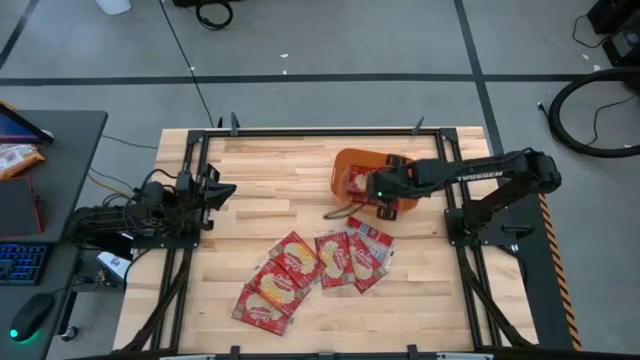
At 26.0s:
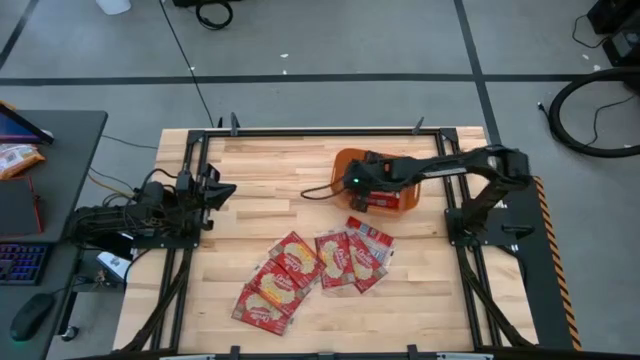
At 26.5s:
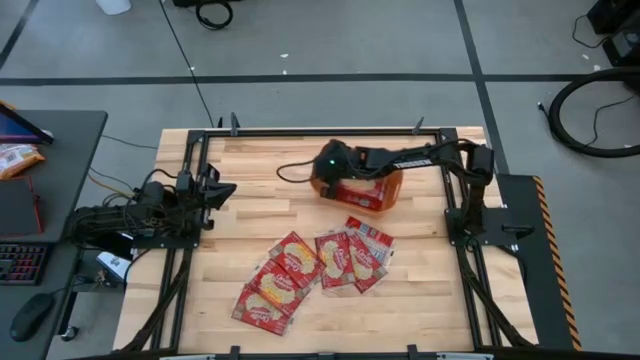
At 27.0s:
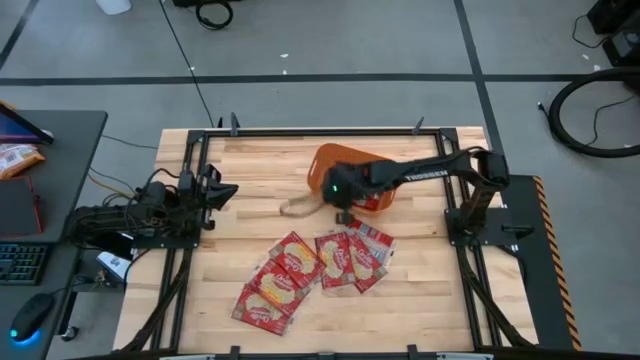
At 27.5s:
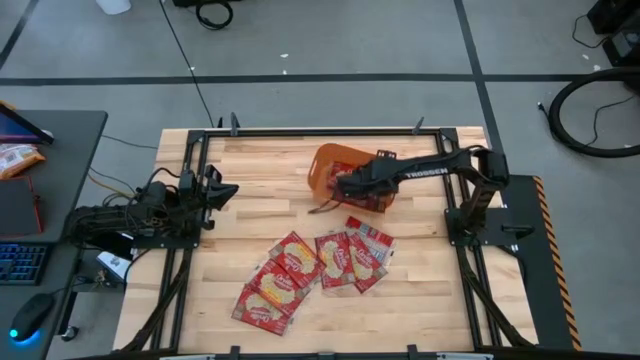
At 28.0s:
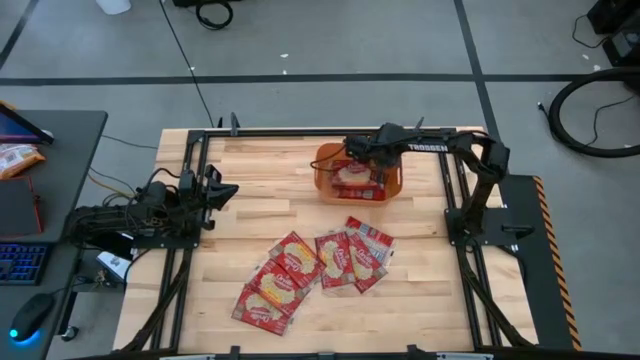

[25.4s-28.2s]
Task: Sort popcorn bags into baskets
Adjust the orange bin on the table

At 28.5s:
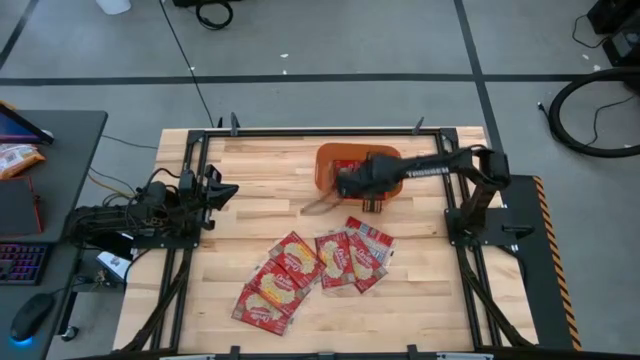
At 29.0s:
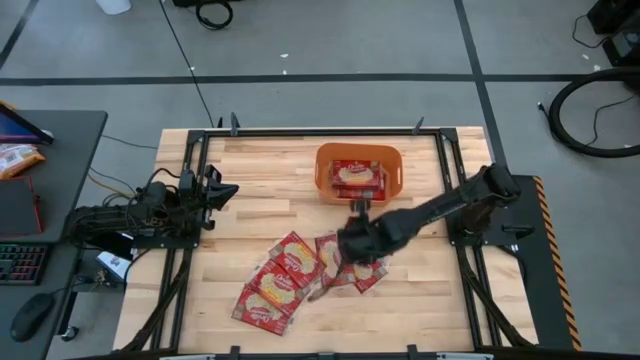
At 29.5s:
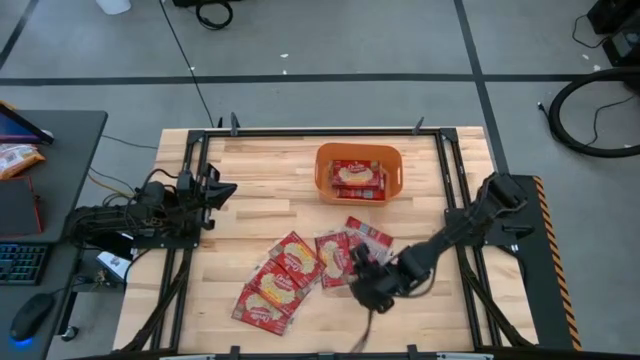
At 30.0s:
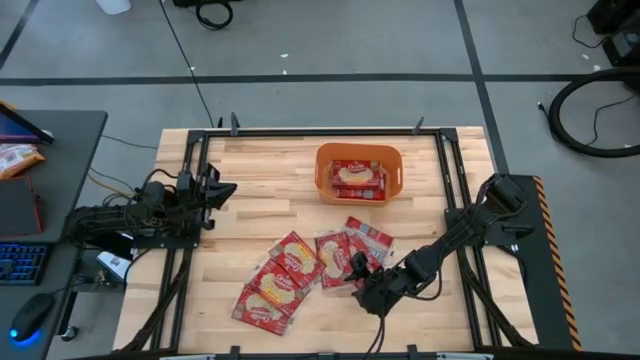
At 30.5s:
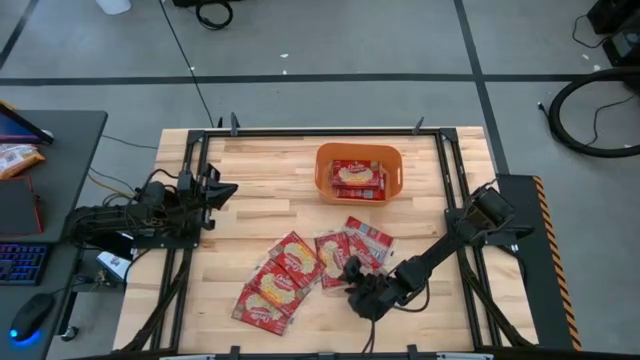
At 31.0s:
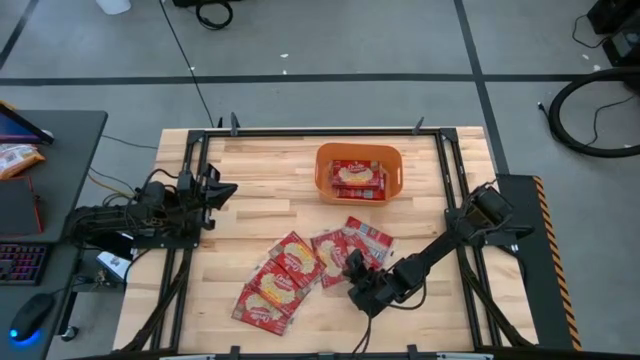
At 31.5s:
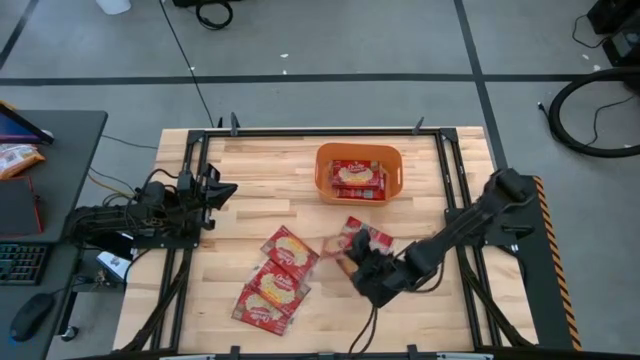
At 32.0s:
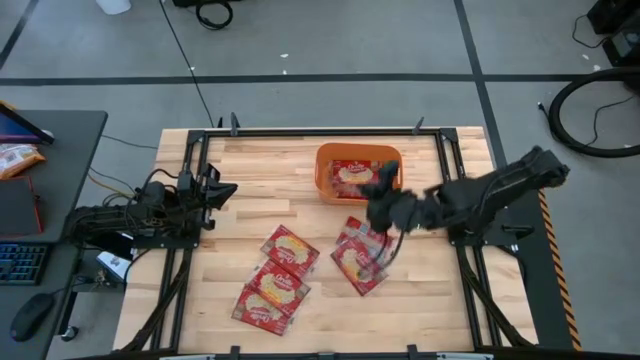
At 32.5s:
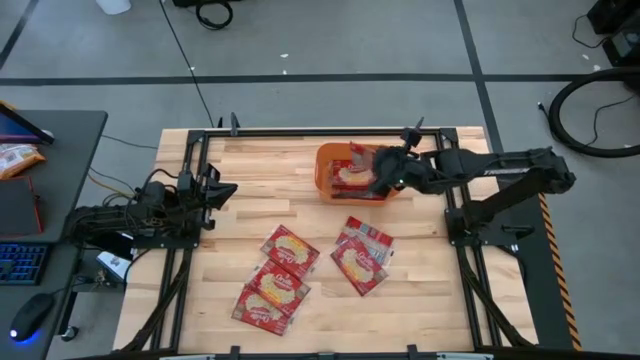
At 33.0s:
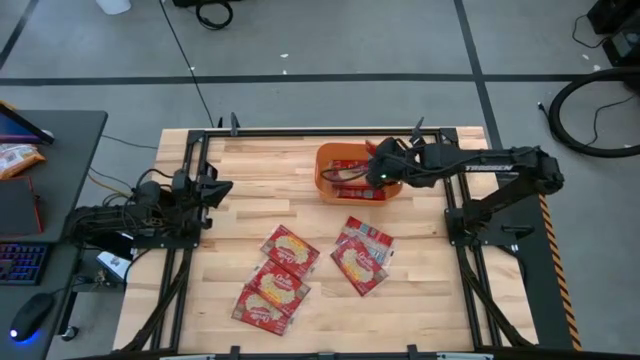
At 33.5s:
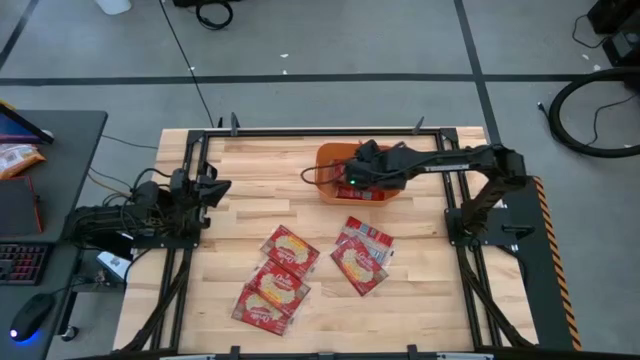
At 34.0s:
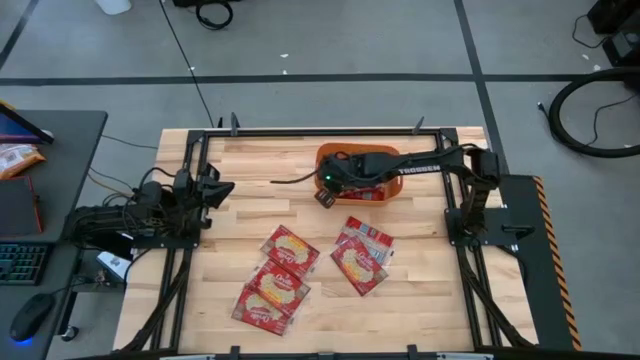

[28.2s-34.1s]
Put the red popcorn bag into the orange bin

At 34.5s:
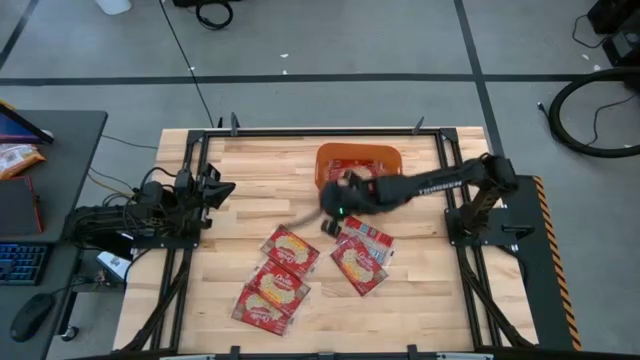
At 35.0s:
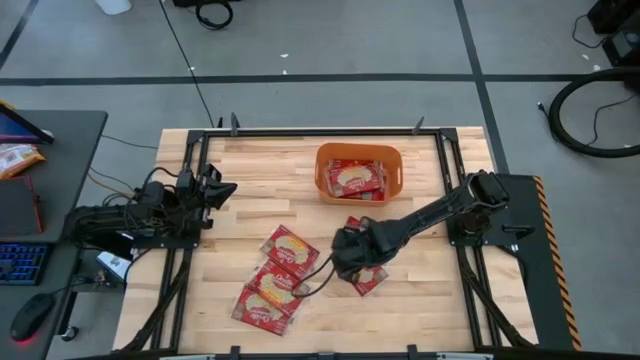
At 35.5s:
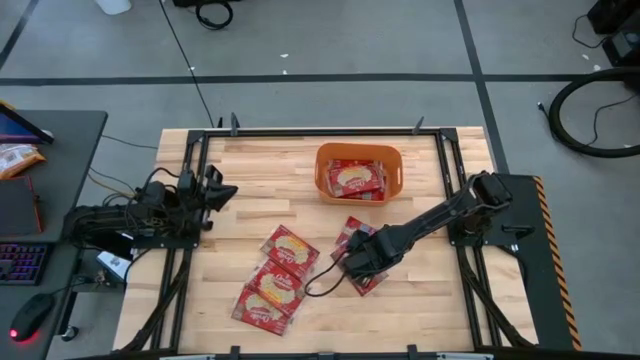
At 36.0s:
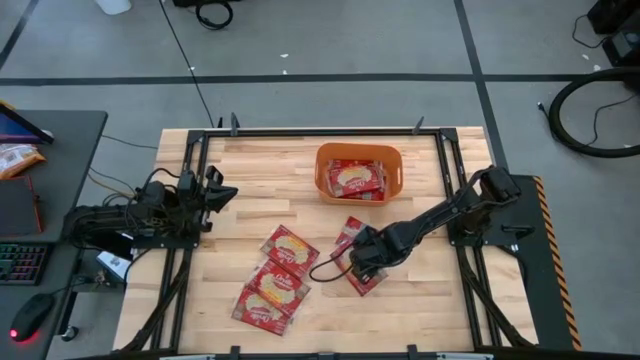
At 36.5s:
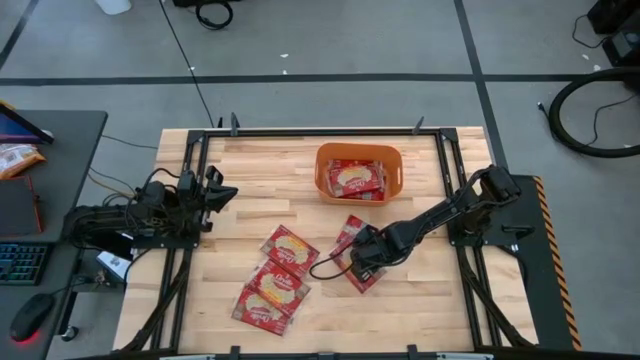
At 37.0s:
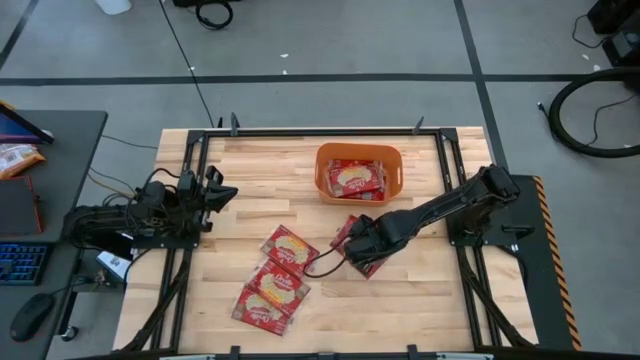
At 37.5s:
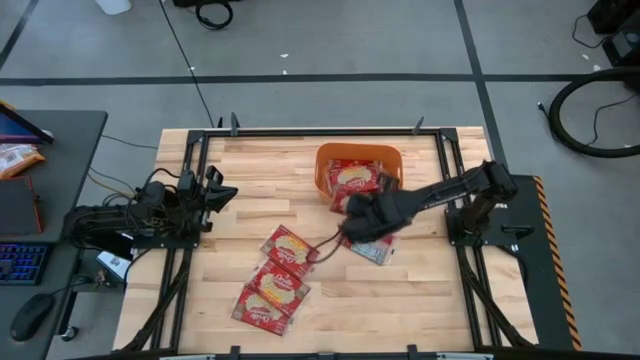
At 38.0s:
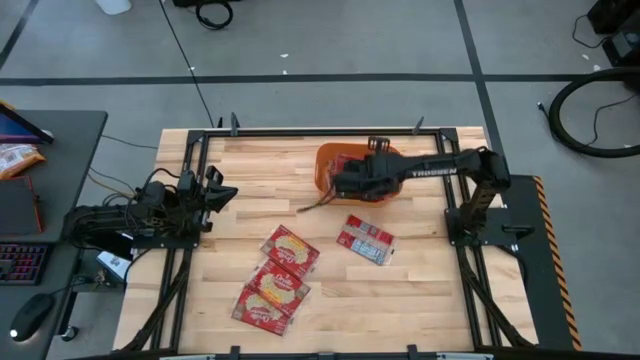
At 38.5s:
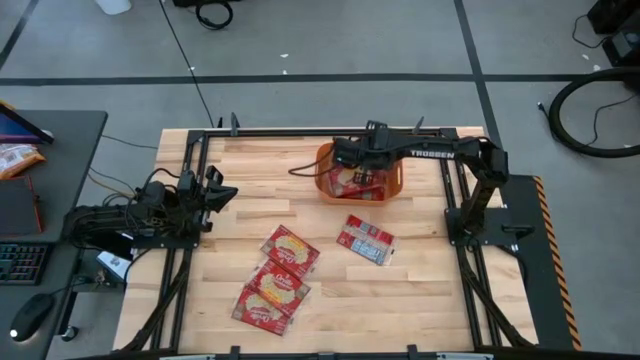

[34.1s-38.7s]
Put the red popcorn bag into the orange bin

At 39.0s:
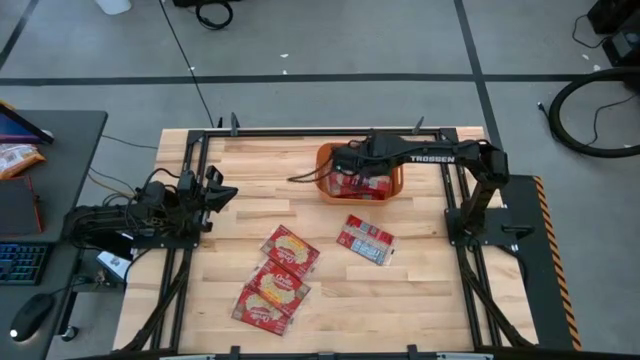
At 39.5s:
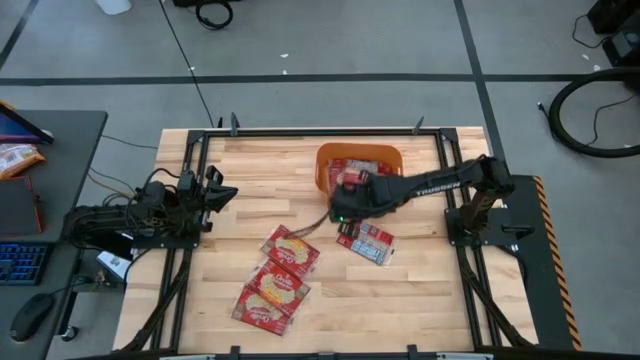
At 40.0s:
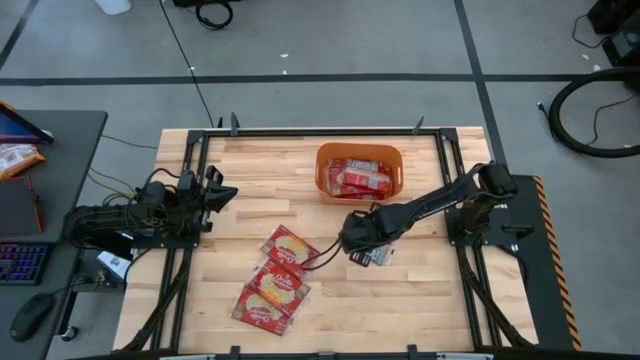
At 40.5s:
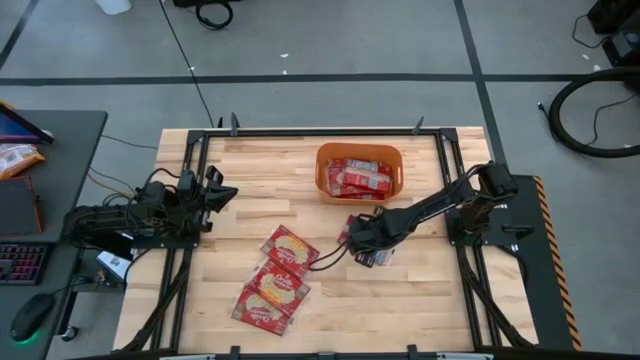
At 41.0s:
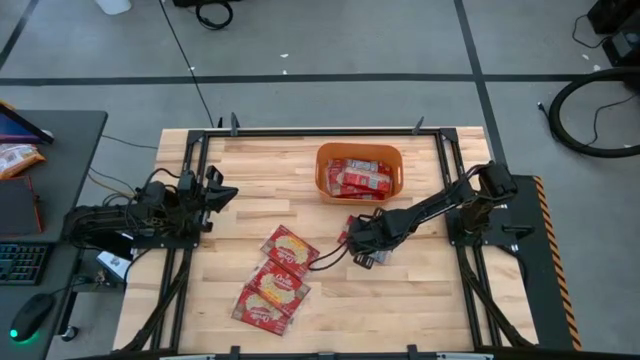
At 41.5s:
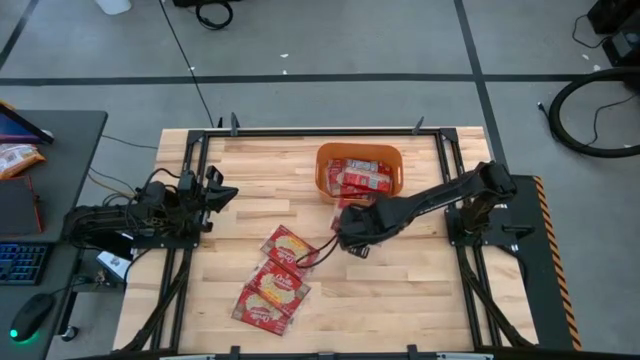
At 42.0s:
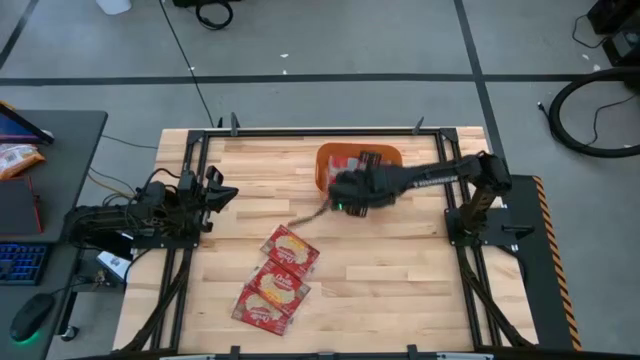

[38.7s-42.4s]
Put the red popcorn bag into the orange bin

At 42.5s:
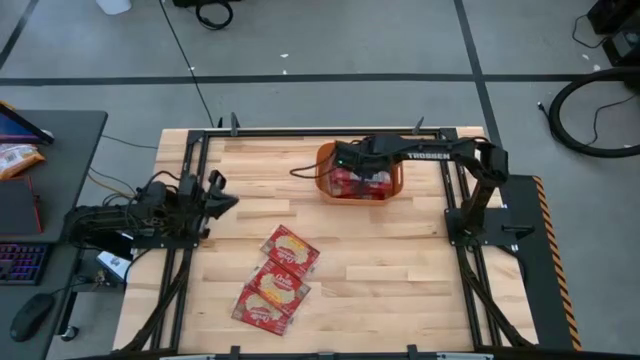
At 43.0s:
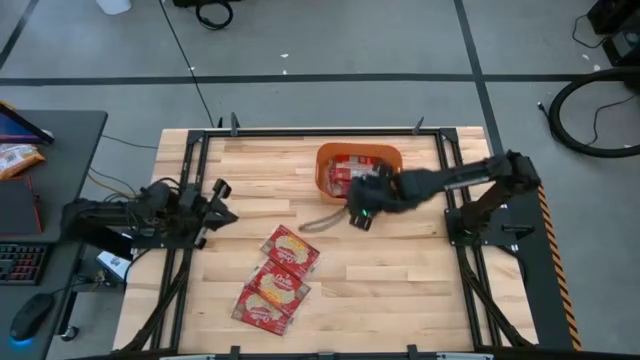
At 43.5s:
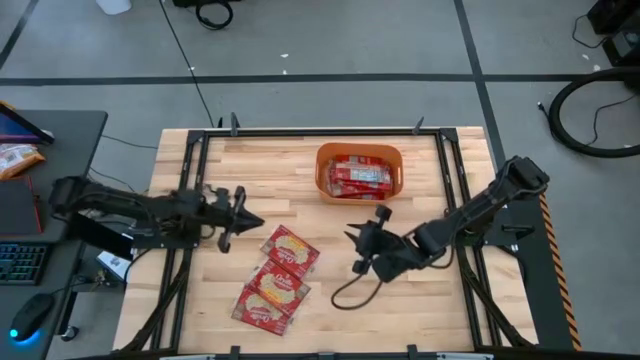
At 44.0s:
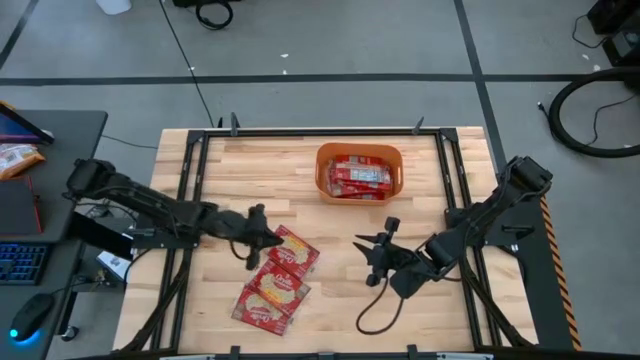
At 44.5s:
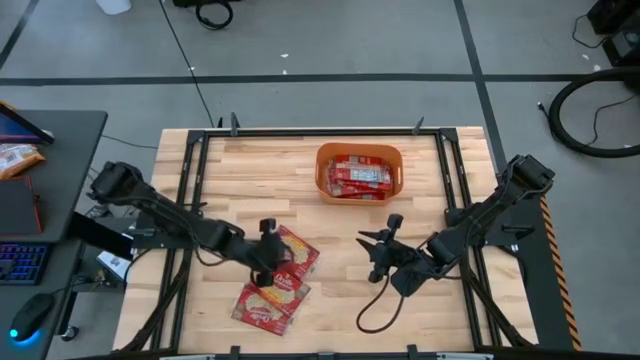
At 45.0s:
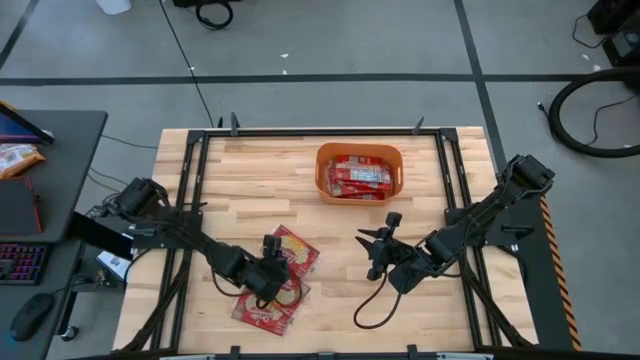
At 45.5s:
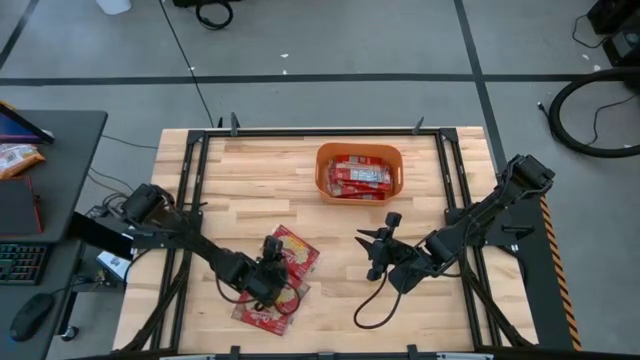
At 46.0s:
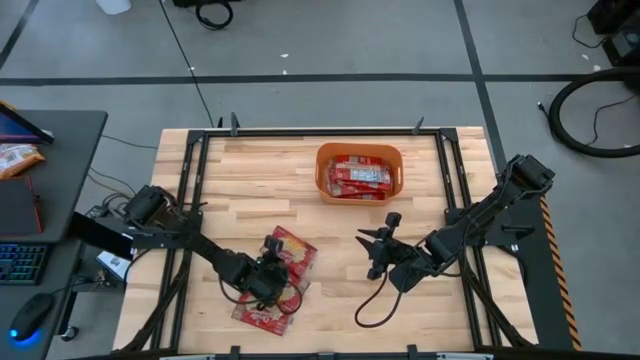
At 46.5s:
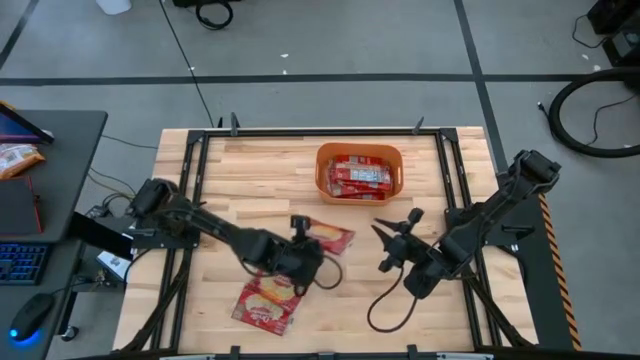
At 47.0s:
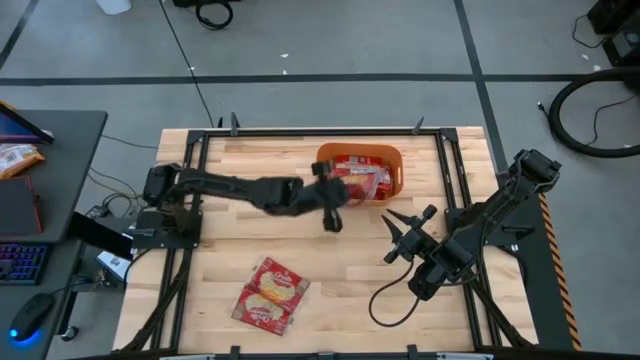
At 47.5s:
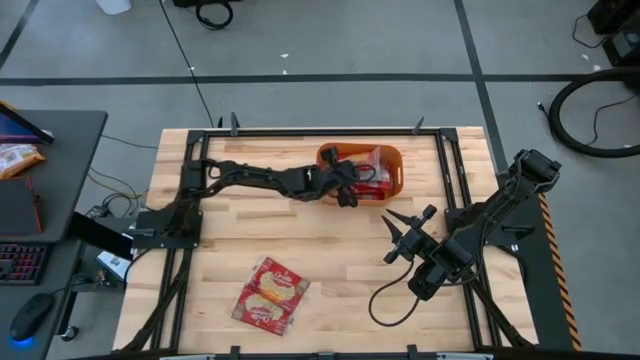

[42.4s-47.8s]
Put the red popcorn bag into the orange bin
